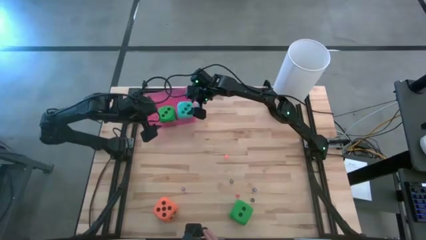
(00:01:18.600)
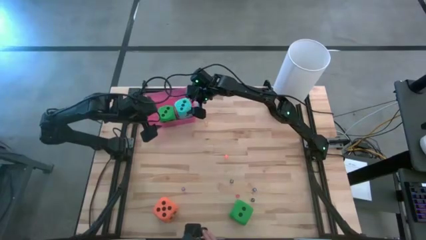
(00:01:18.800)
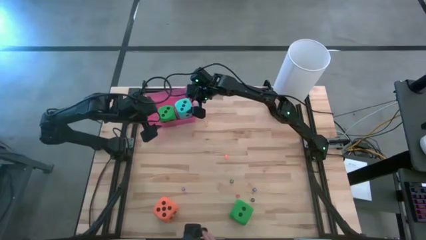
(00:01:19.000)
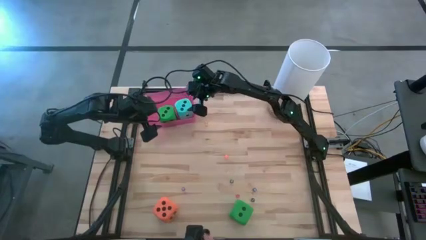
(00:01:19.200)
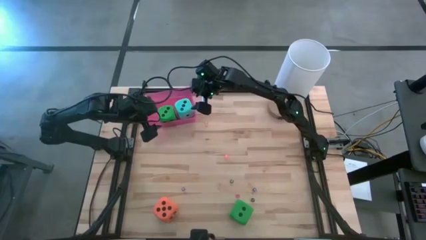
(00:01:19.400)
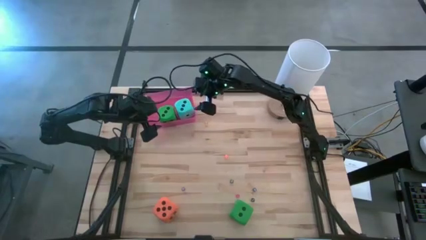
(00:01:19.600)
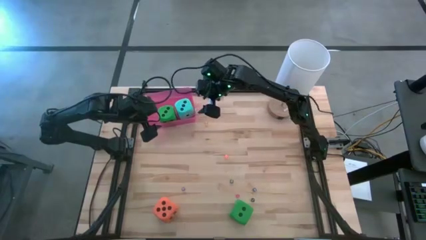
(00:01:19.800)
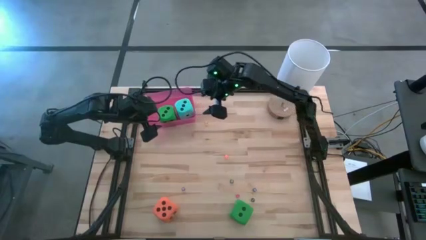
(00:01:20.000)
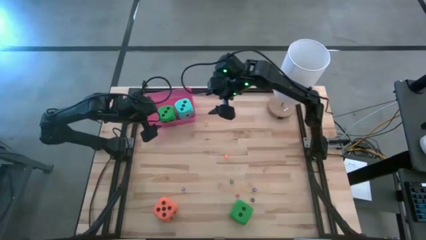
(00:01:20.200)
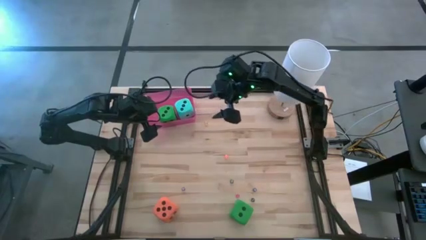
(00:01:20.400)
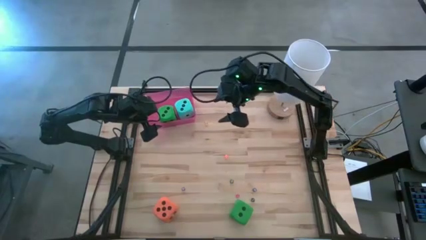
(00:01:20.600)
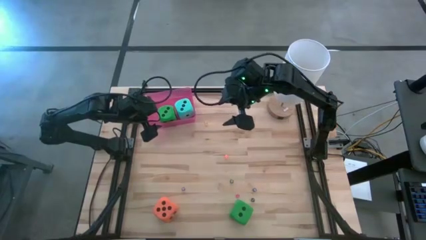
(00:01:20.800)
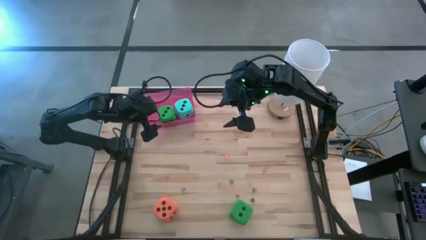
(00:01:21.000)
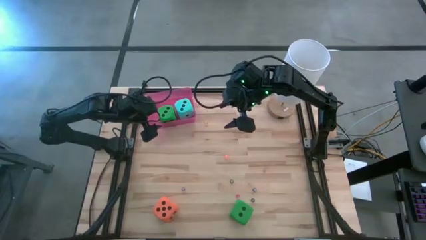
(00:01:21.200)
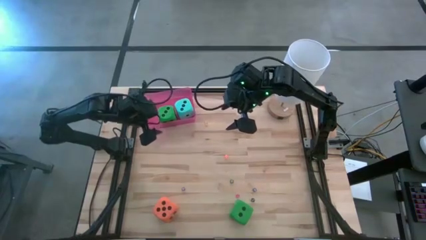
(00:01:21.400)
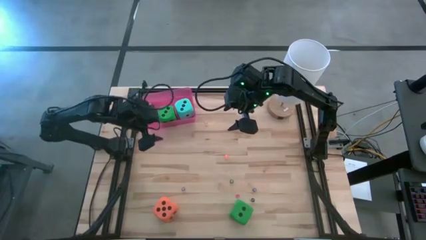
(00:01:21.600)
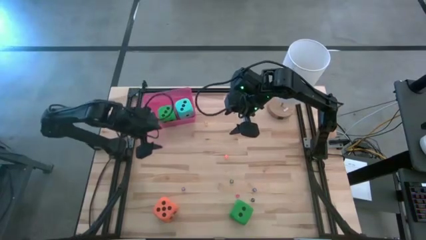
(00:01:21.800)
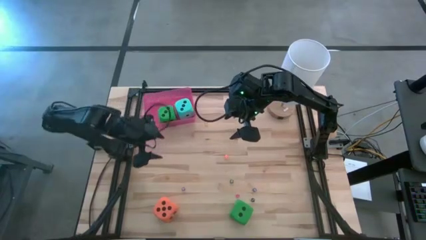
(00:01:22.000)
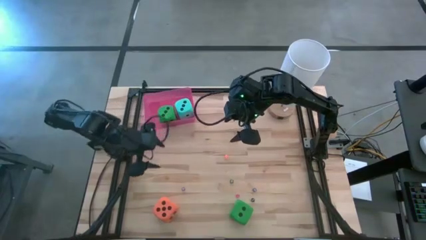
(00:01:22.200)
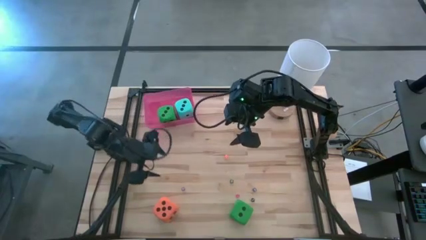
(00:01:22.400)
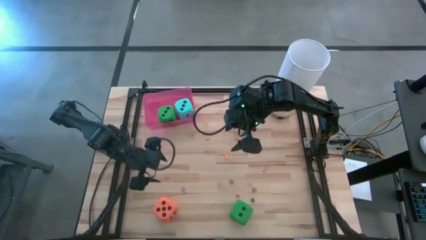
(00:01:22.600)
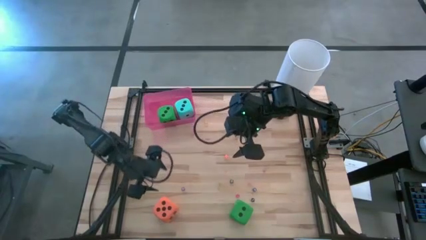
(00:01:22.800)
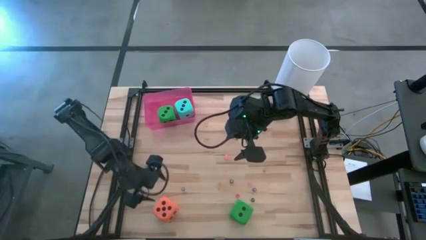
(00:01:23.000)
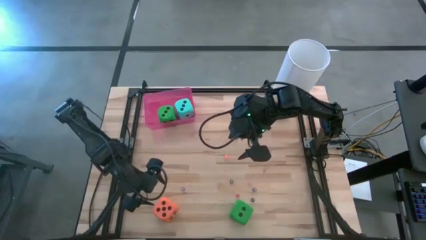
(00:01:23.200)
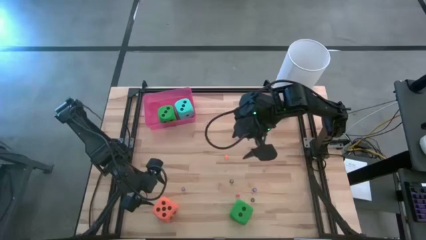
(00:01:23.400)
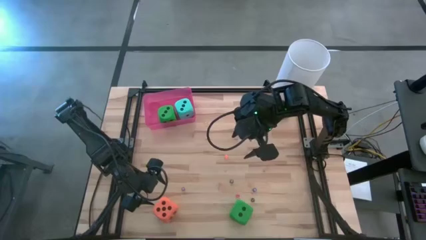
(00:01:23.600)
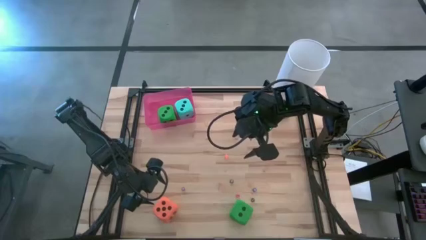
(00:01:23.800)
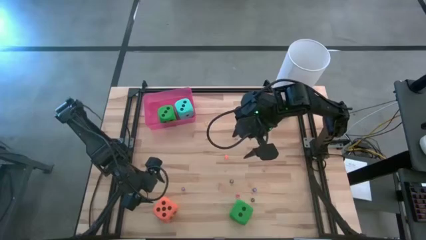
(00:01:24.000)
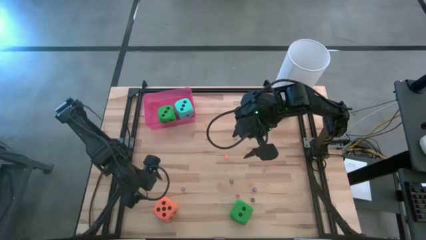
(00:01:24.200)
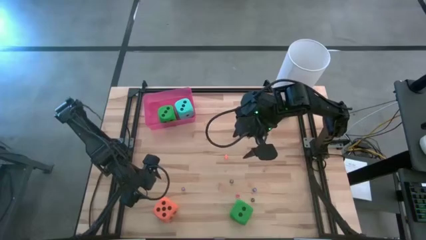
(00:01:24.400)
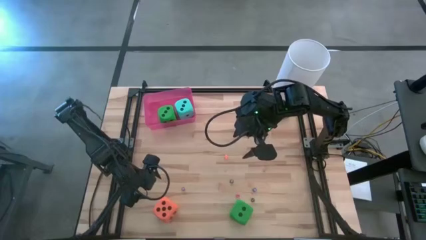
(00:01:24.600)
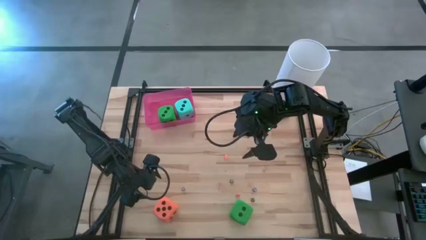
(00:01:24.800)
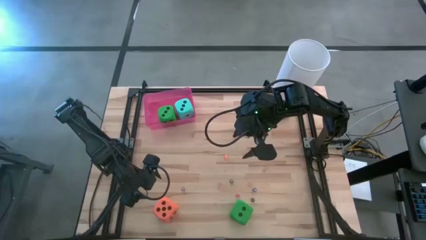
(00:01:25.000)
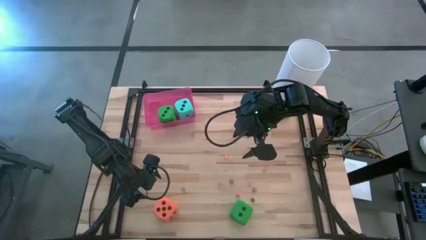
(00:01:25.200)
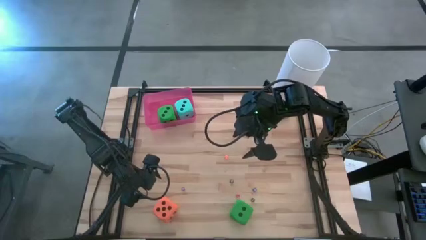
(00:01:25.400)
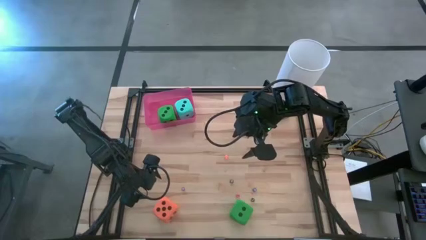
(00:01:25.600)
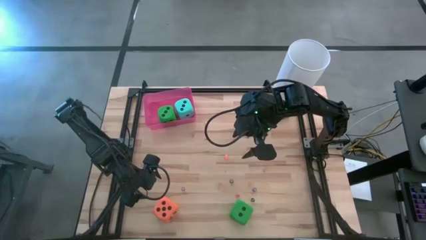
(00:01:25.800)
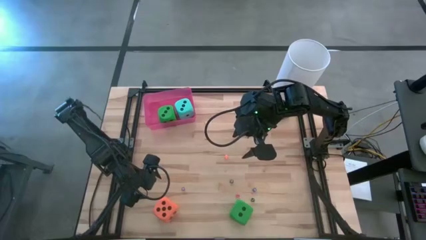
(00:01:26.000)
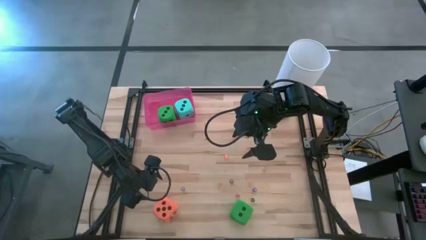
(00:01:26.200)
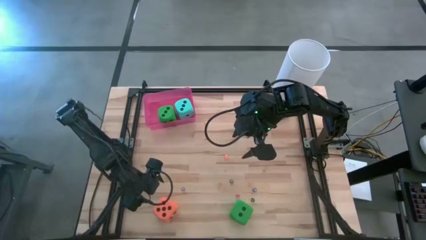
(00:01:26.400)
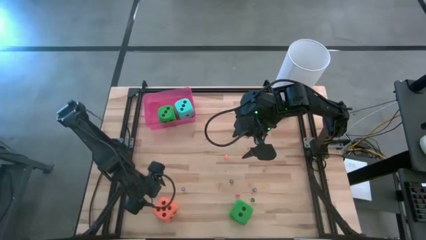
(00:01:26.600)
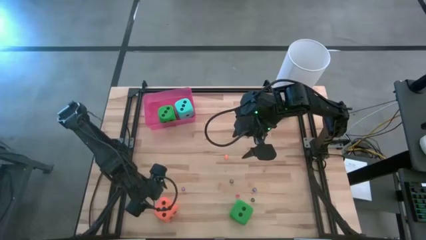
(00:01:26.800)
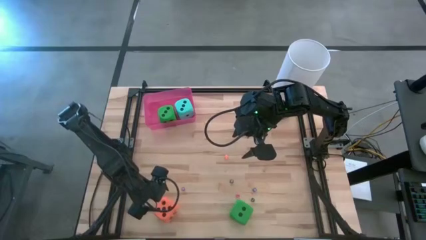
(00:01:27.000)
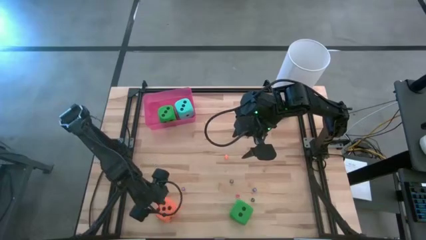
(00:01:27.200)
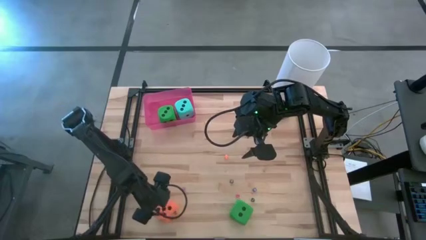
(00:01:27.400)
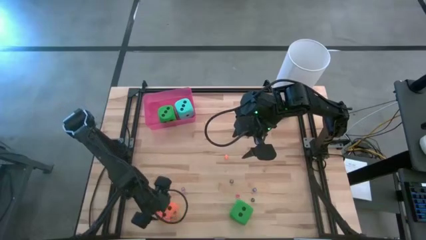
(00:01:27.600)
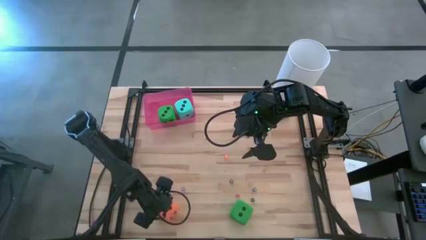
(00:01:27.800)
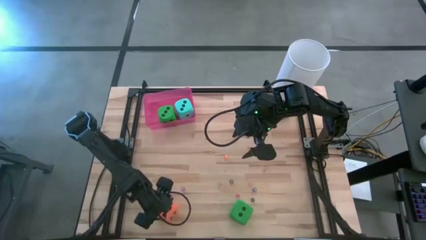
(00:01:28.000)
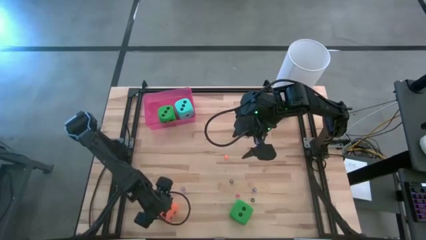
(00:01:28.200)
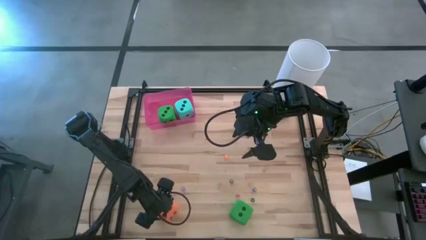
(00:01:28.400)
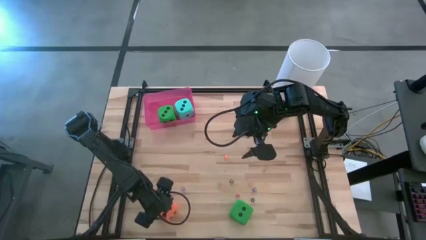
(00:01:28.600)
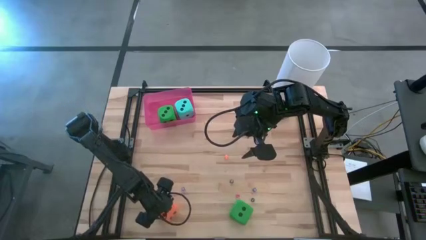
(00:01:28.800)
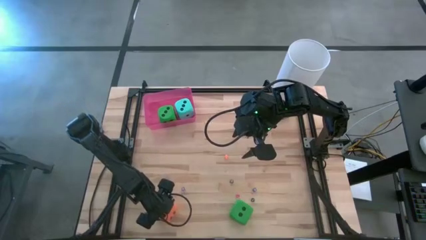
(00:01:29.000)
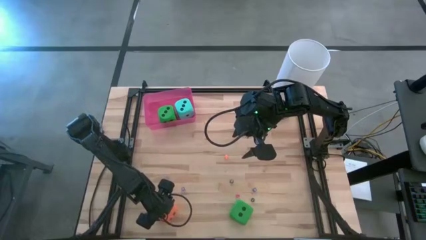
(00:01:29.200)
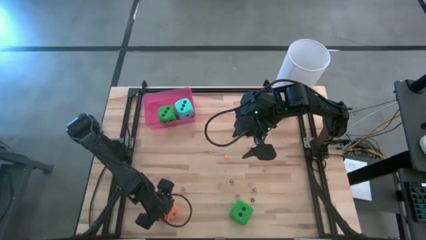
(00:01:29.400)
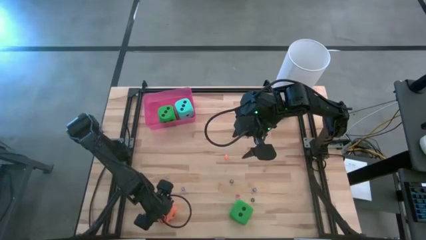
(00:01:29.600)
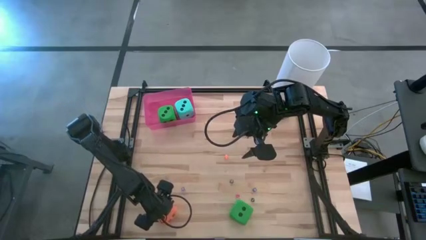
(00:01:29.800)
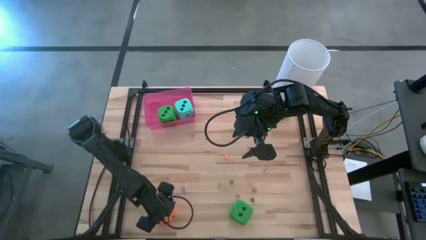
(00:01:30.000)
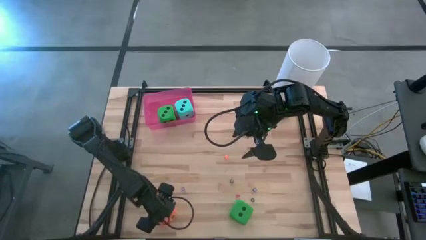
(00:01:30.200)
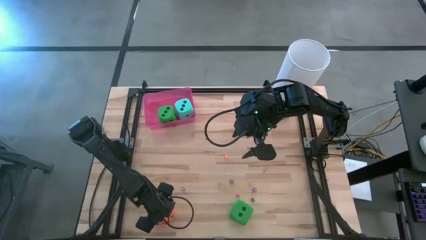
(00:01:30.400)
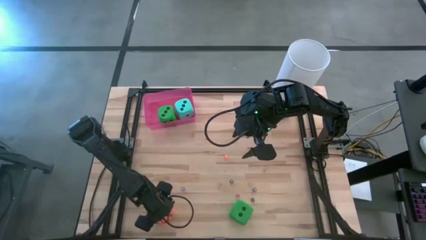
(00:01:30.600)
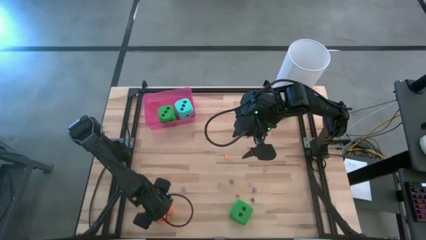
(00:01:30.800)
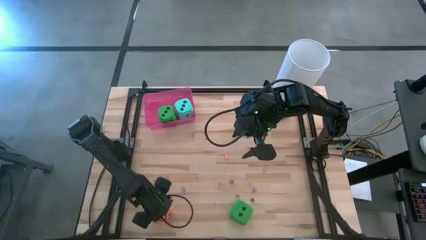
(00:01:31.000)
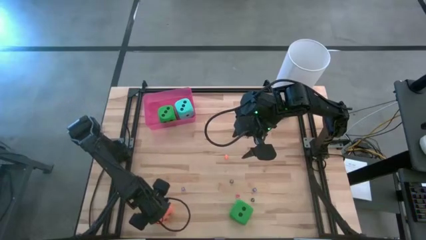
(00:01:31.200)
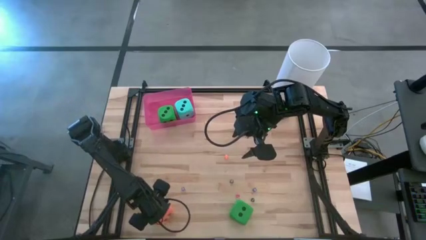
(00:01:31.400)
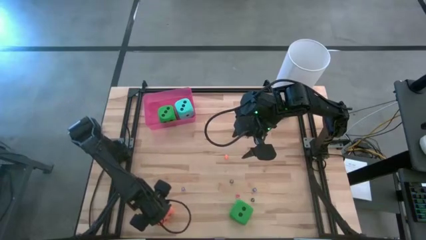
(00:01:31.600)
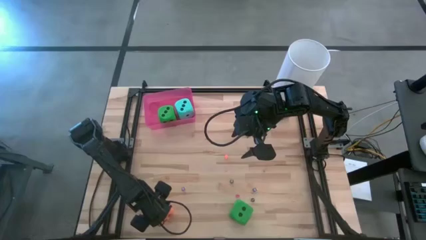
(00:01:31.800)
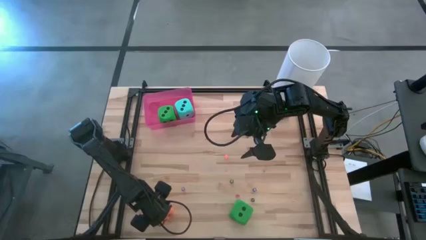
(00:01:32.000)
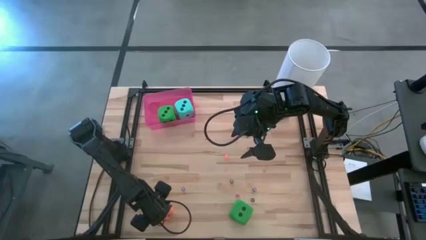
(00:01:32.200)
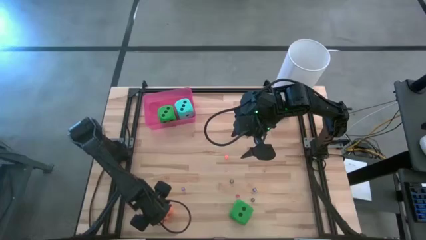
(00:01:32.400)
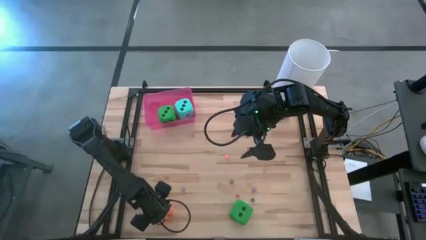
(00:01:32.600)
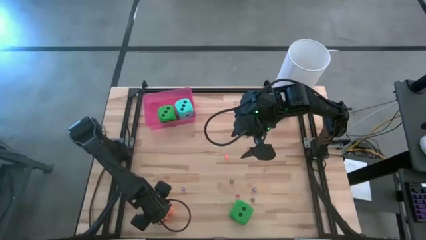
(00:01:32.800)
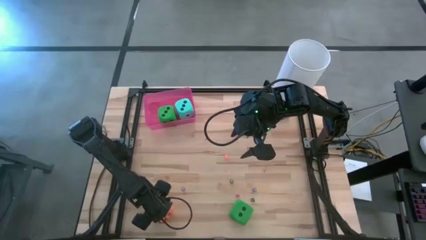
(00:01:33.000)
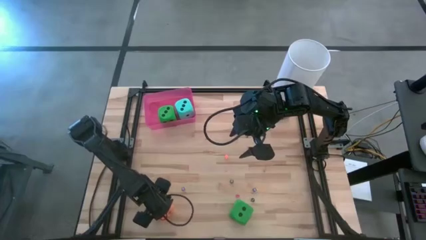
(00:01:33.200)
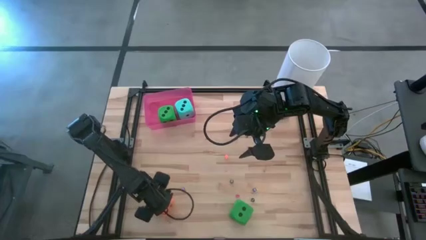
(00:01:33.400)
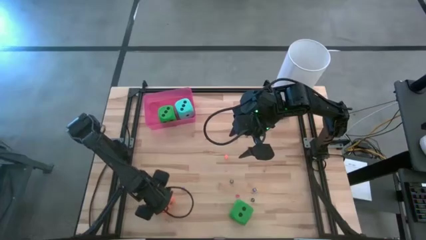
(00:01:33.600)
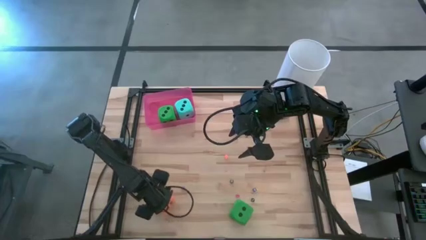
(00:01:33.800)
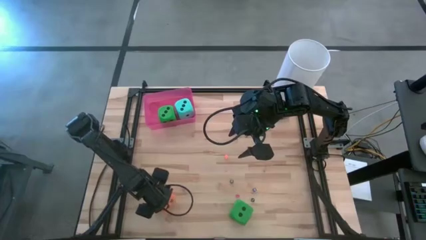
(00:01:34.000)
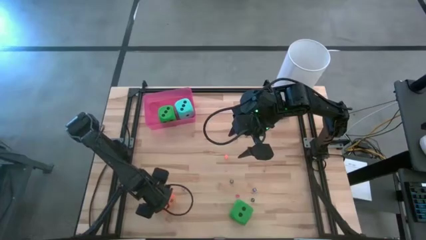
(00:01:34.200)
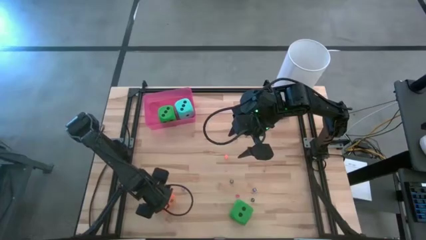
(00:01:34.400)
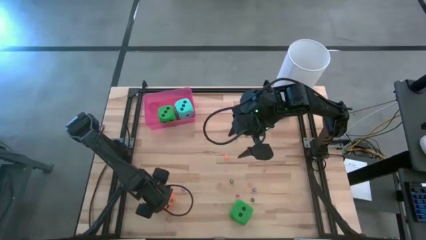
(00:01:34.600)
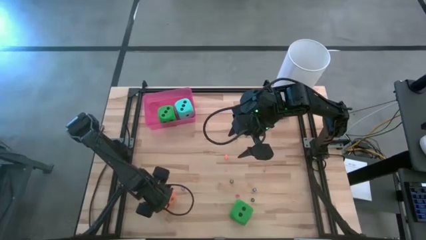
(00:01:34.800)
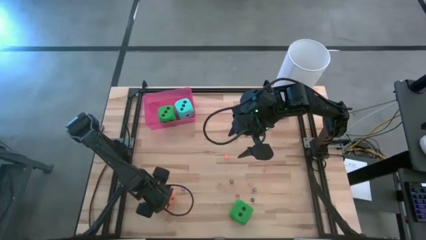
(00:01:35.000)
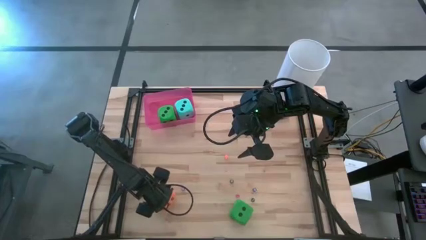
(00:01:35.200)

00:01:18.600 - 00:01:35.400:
Task: Pick & Place Dice
Put the big orange dice into the red bin
